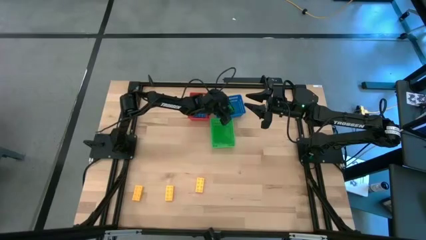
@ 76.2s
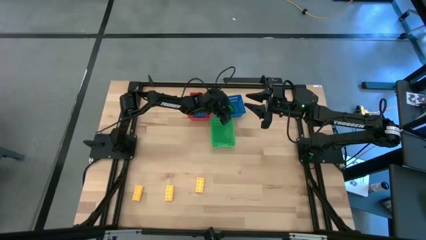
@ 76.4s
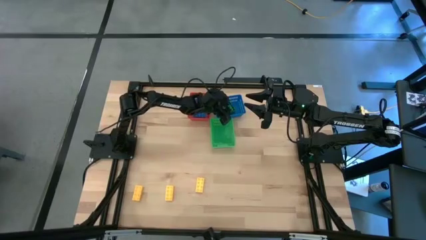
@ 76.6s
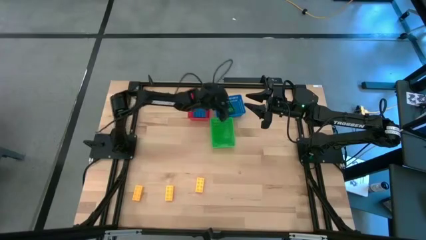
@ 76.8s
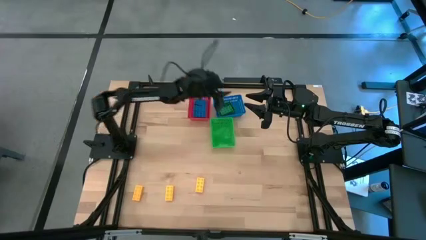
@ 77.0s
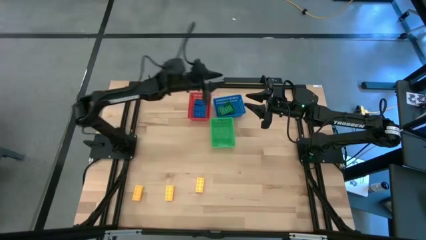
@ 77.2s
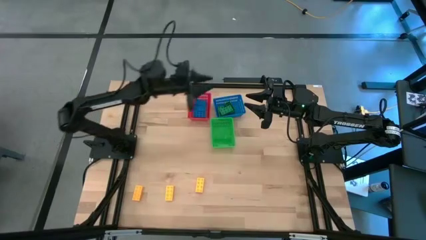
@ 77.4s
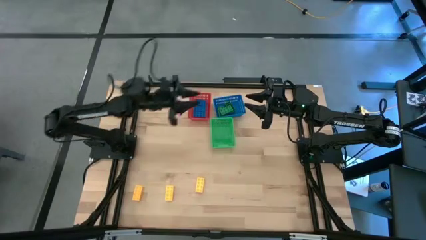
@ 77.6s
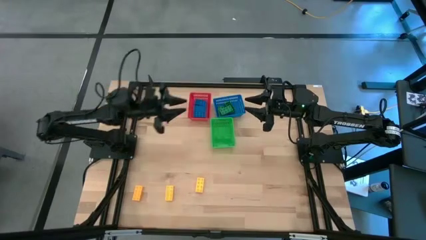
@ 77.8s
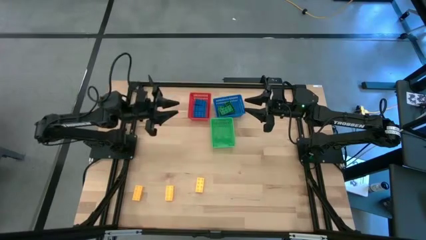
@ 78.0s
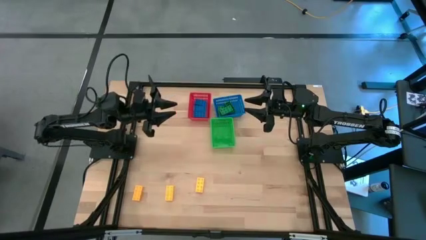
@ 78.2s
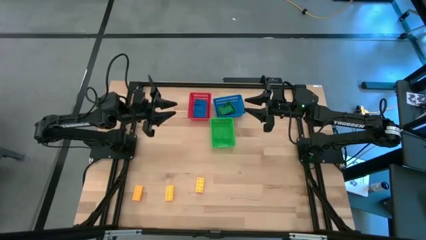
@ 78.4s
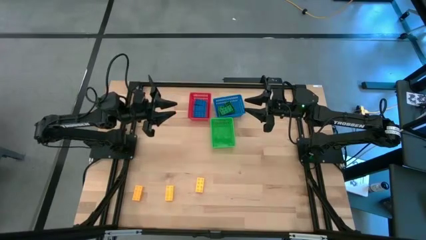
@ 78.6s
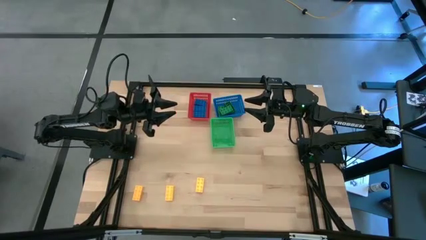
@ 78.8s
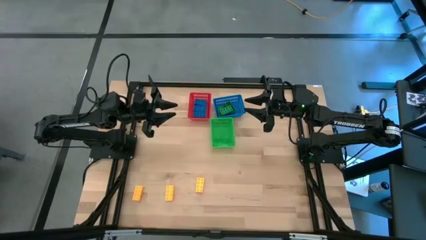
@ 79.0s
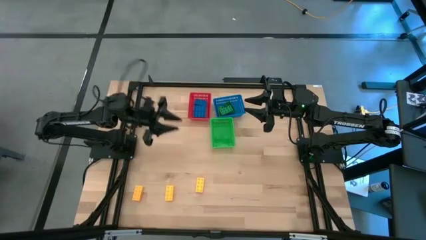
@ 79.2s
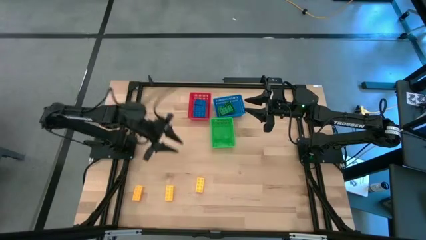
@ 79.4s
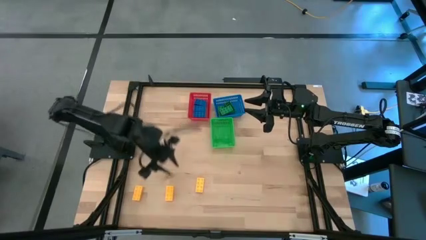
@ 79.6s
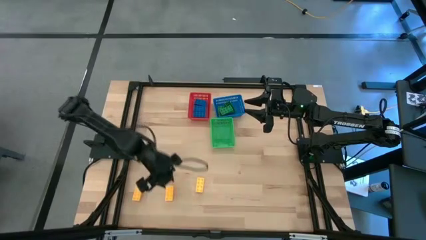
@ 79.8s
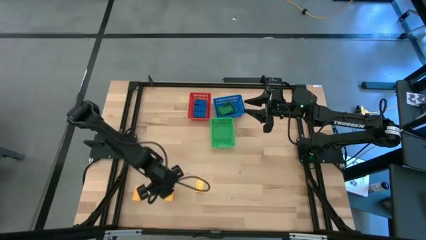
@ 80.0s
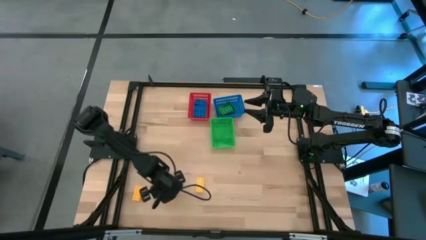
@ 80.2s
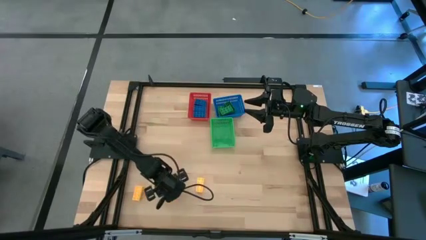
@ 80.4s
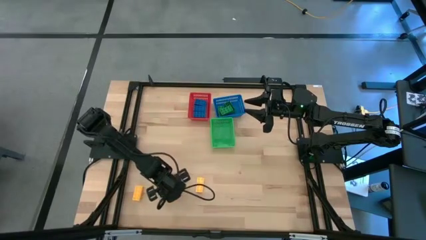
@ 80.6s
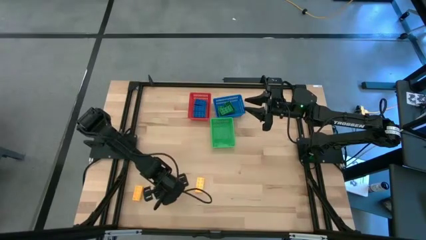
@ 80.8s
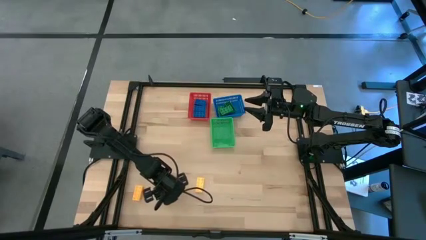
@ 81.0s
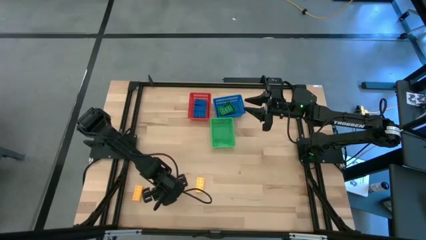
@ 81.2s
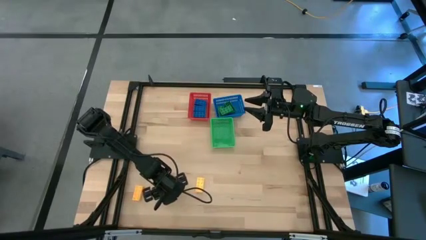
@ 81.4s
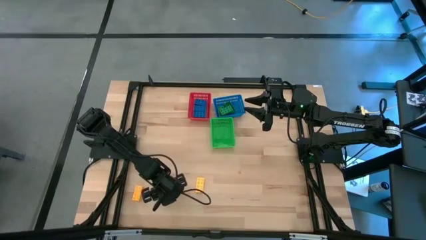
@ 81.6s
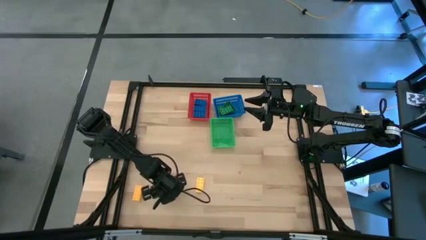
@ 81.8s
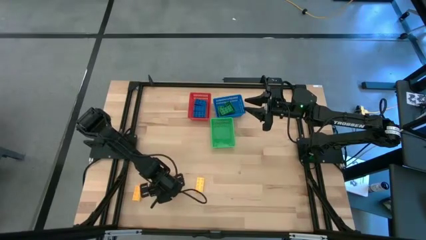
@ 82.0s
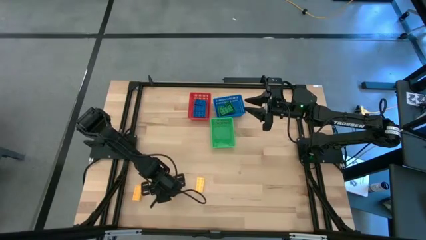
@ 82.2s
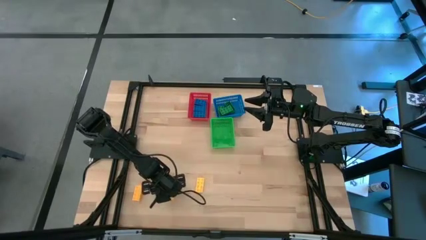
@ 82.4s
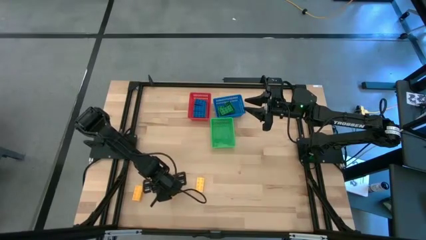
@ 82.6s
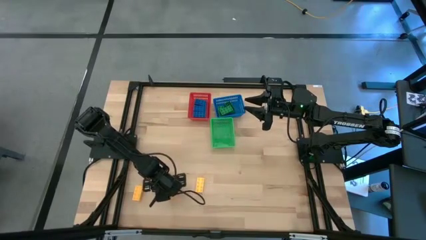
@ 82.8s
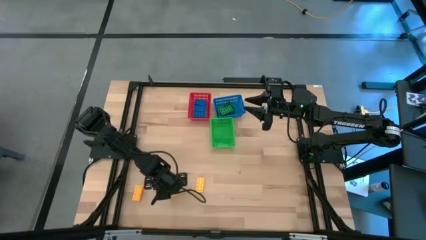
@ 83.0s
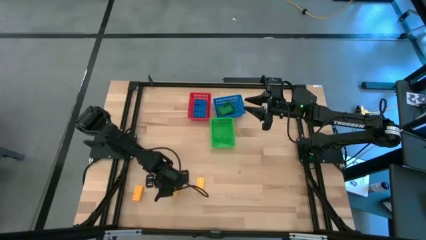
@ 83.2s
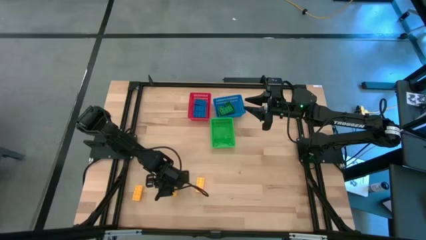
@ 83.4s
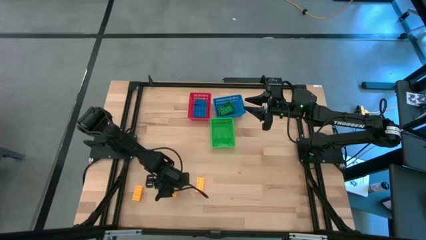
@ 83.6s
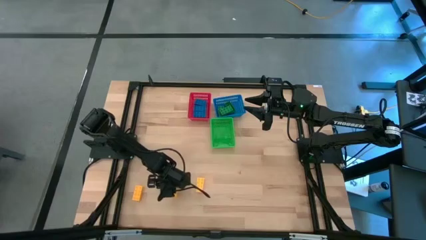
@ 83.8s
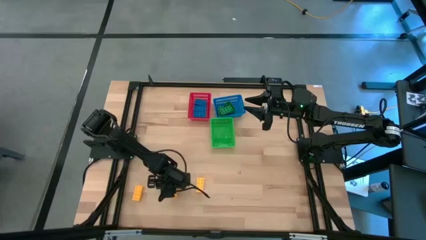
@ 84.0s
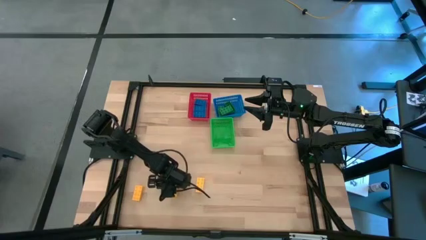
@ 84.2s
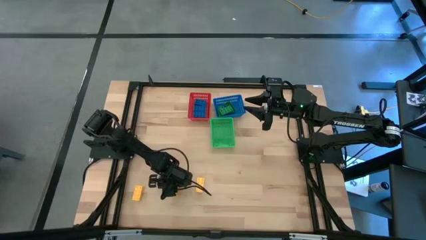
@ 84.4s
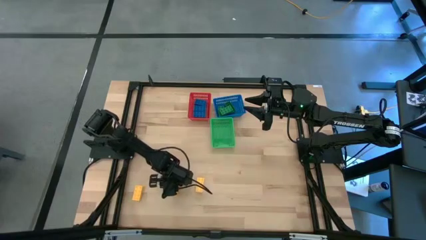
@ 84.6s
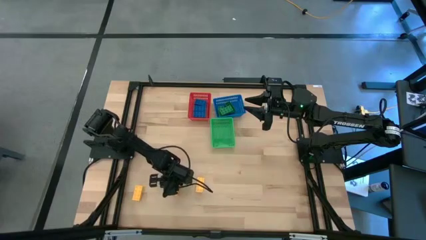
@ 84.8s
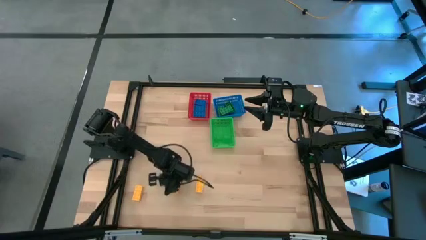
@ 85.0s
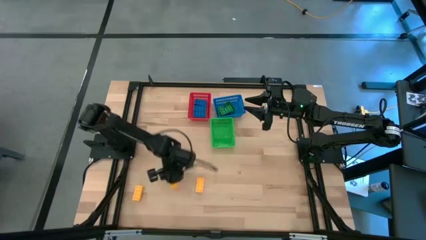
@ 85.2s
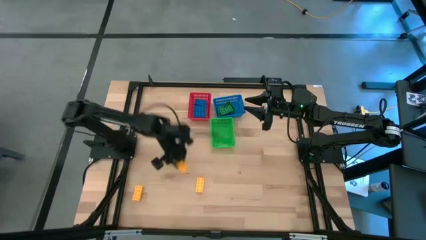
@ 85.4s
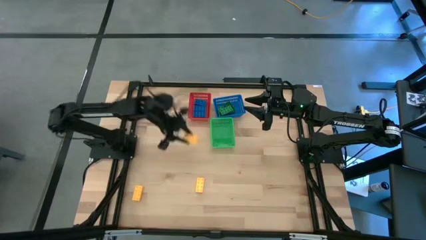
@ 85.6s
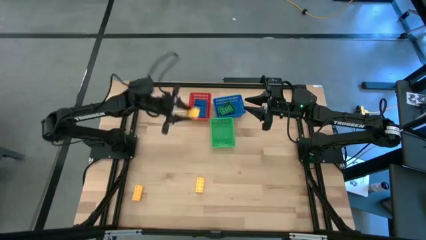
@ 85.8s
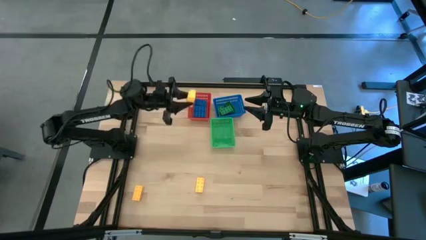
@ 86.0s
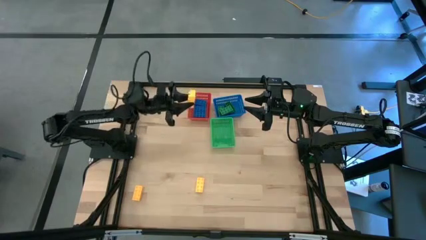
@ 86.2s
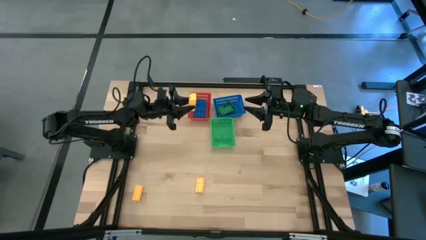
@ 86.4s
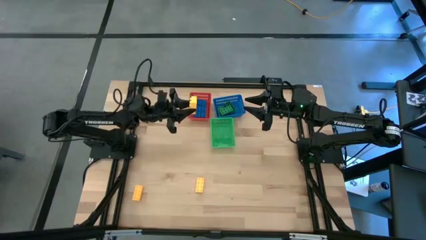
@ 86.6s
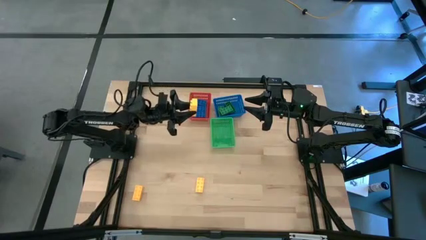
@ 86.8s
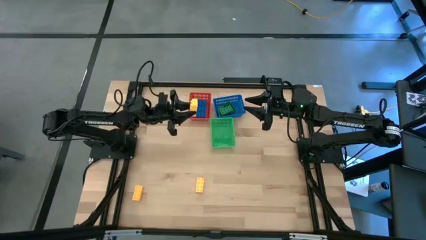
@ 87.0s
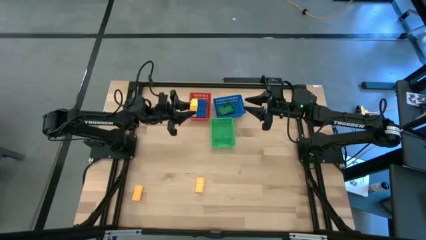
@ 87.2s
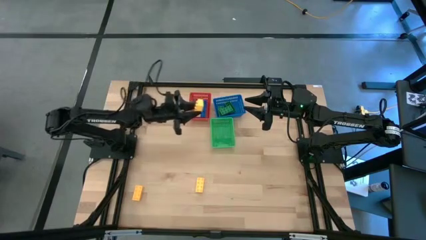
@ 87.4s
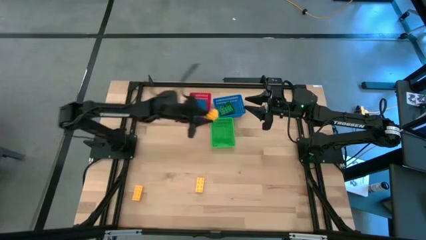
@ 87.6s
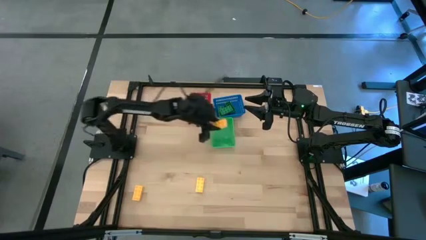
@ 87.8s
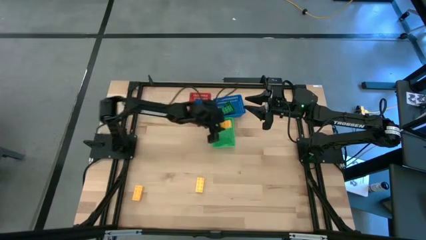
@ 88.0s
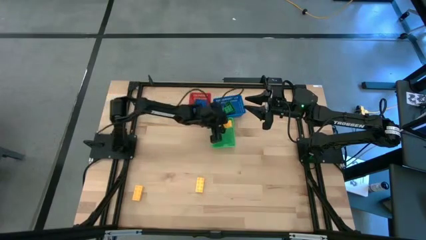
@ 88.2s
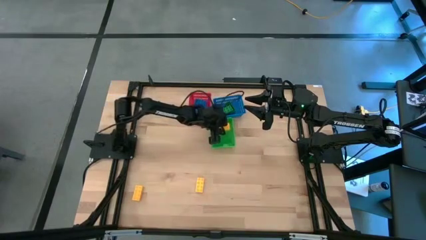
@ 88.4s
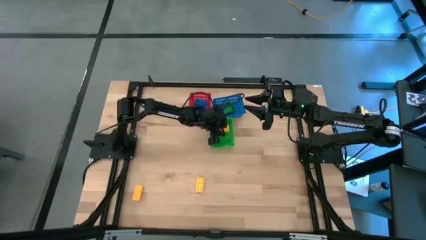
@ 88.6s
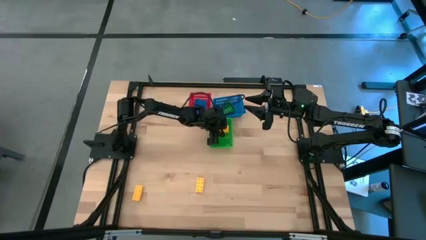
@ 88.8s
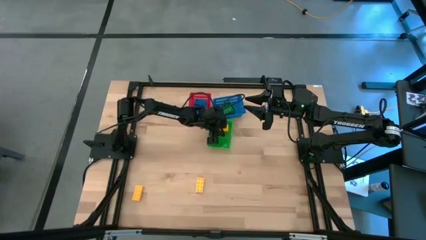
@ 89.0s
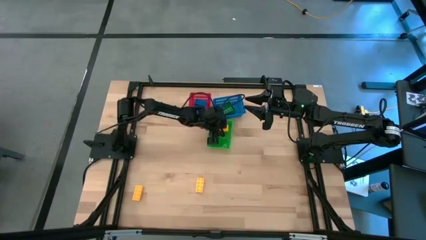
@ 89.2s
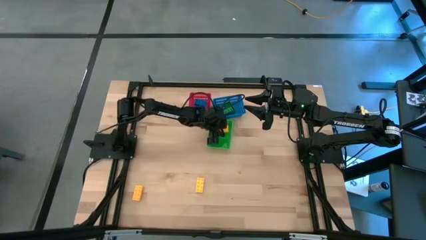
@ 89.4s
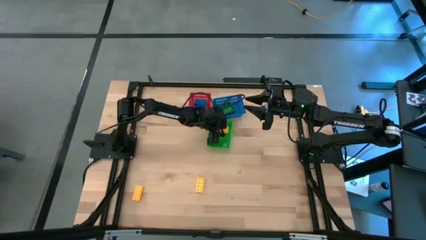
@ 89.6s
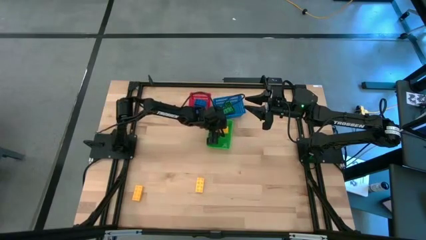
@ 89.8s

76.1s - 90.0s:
Task: Sort & place blocks by color
Put the middle yellow game piece into the green bin

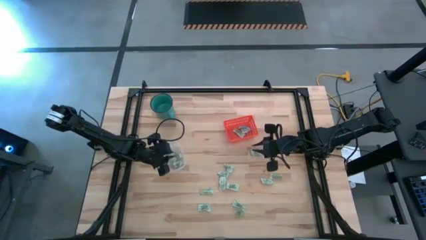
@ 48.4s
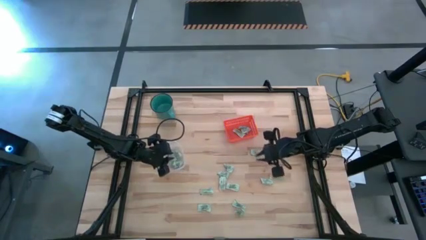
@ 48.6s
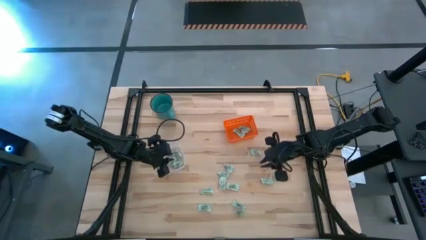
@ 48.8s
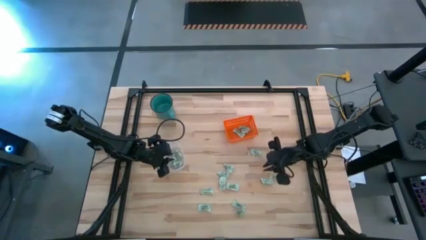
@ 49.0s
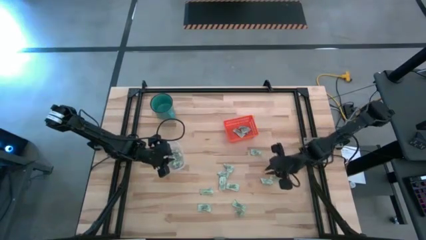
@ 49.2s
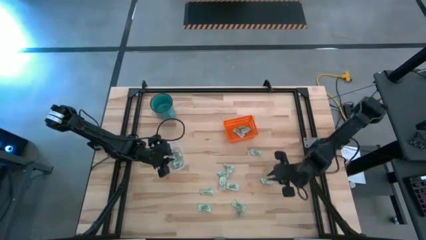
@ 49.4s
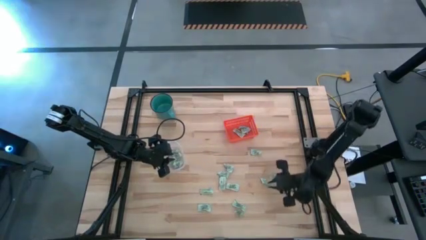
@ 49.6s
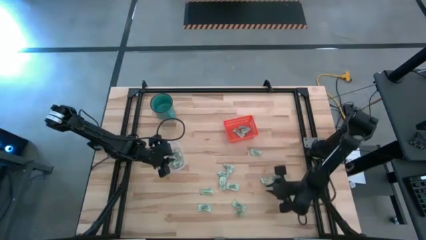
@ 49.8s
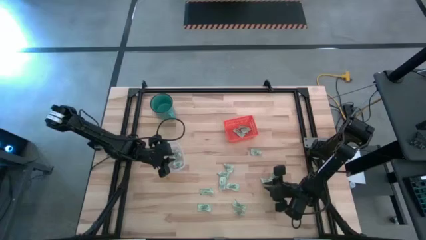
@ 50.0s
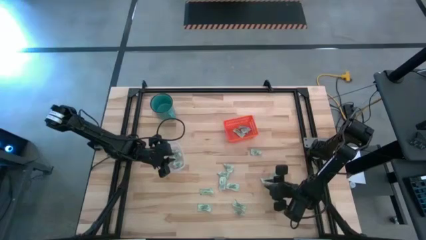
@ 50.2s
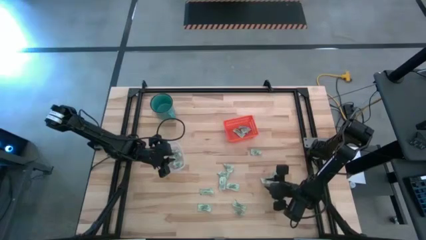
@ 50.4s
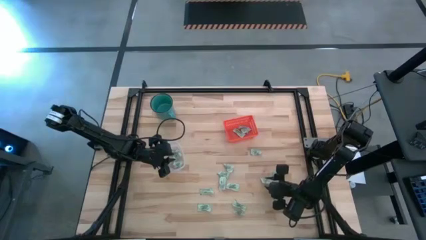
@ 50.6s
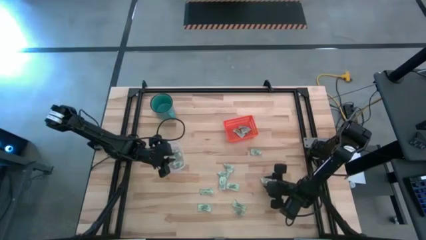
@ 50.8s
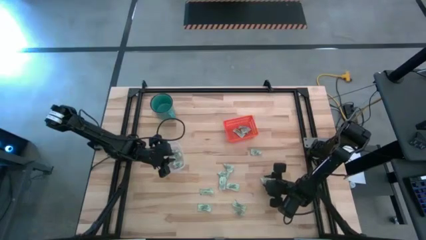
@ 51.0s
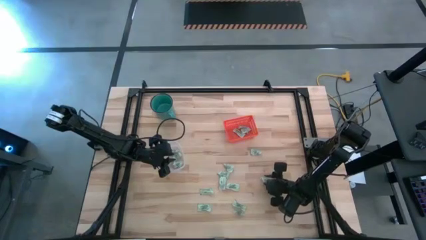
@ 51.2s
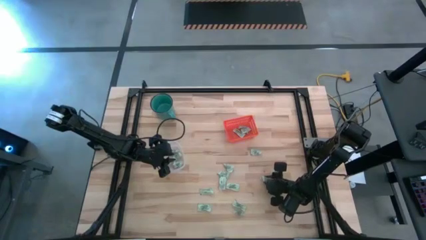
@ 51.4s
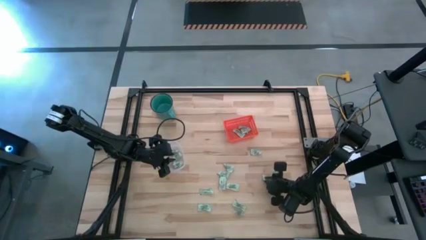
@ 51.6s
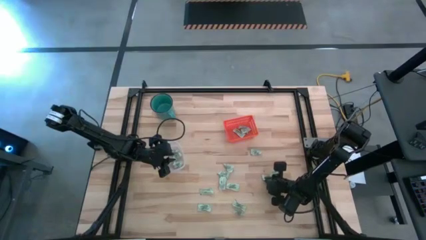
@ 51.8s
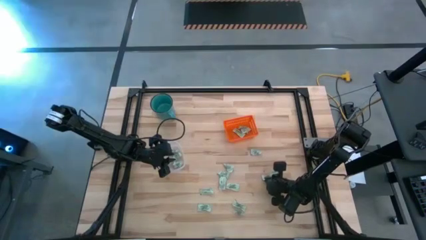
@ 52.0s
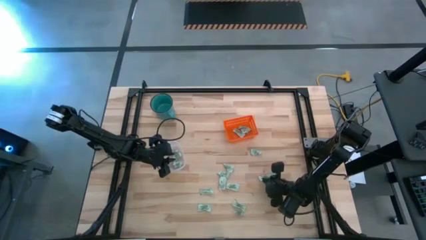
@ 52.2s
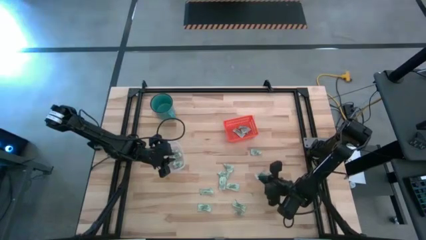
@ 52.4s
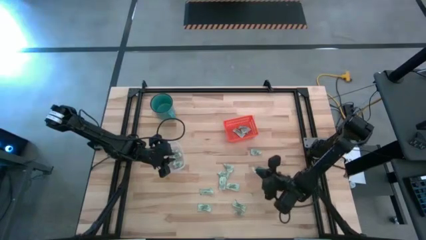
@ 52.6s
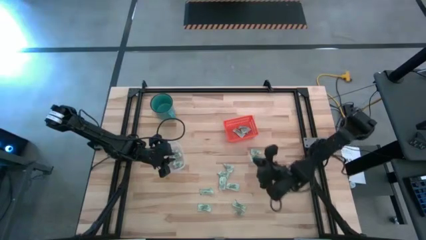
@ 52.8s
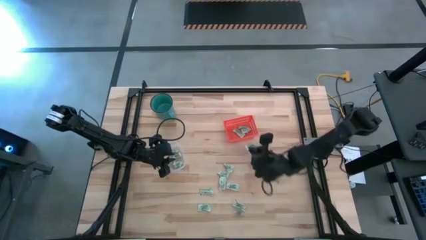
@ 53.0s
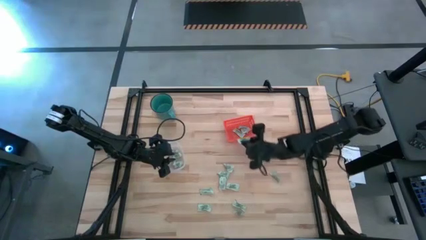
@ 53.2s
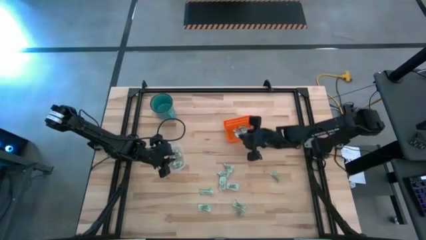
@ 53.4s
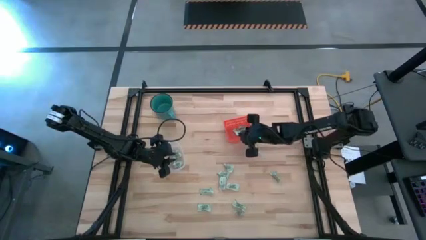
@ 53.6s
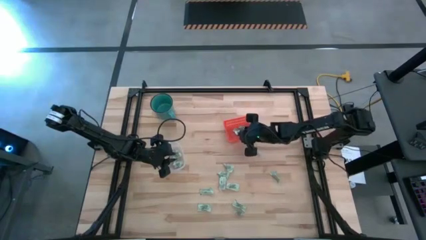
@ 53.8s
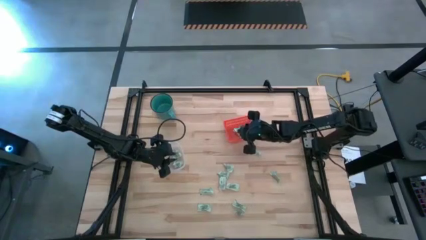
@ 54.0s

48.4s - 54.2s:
Task: Pick and place items into bin
Put the light green stevia packet into the orange bin
